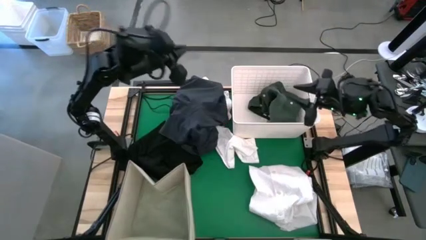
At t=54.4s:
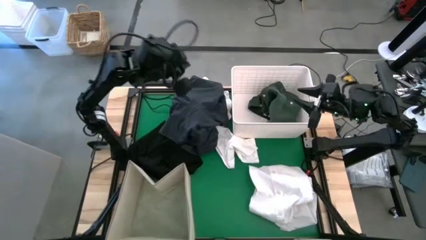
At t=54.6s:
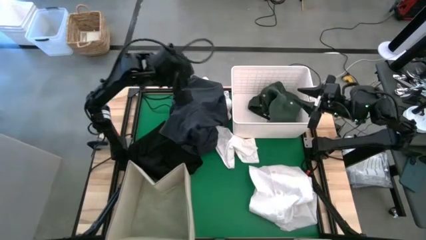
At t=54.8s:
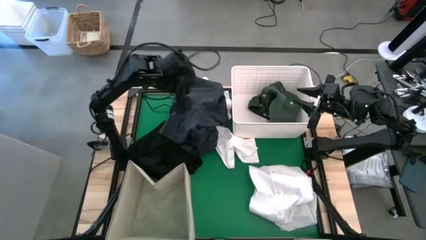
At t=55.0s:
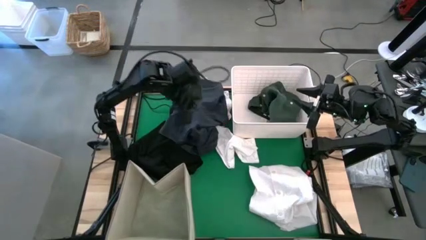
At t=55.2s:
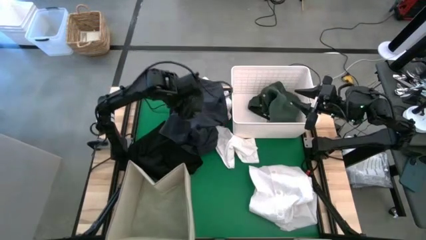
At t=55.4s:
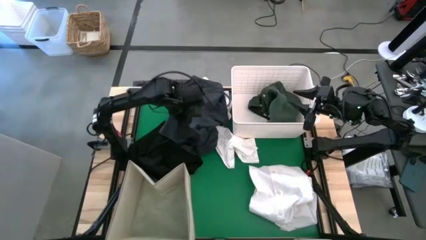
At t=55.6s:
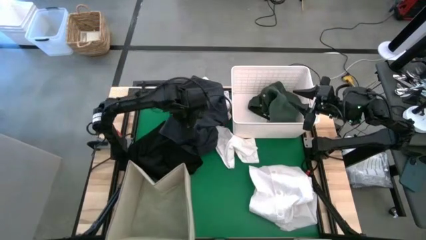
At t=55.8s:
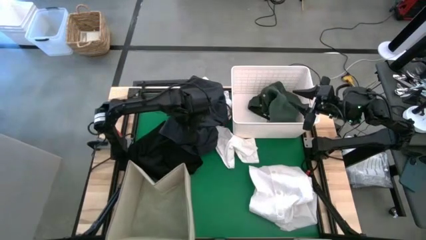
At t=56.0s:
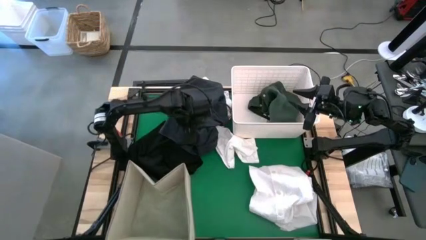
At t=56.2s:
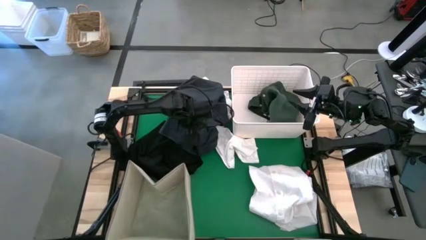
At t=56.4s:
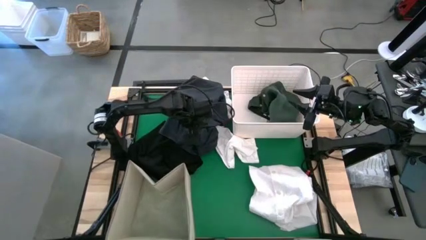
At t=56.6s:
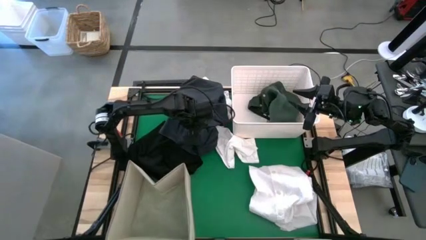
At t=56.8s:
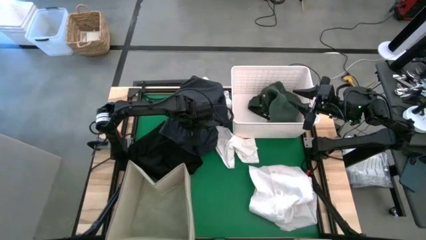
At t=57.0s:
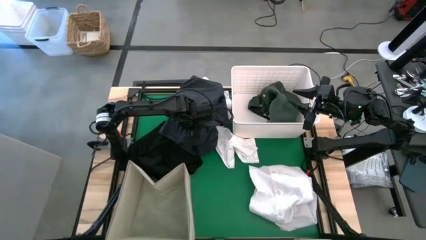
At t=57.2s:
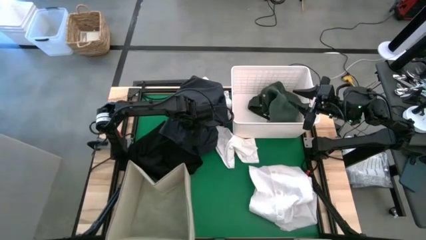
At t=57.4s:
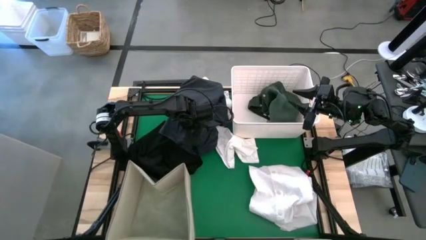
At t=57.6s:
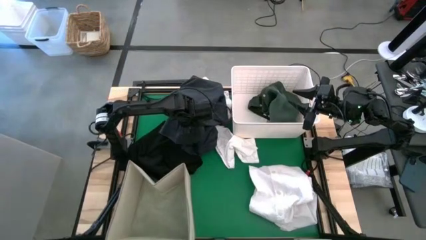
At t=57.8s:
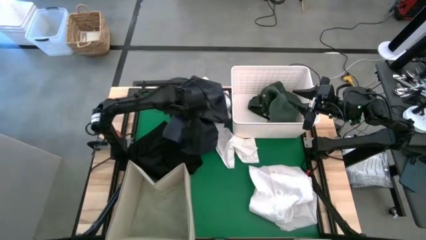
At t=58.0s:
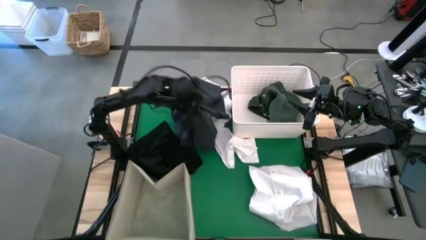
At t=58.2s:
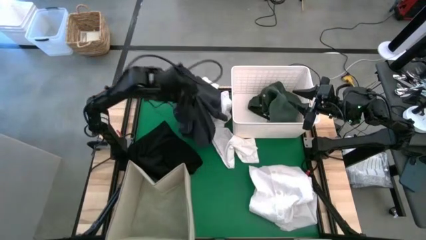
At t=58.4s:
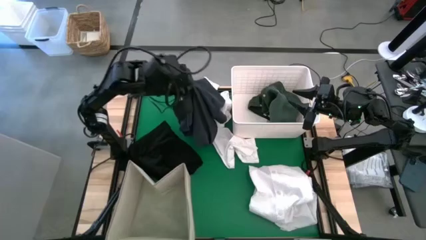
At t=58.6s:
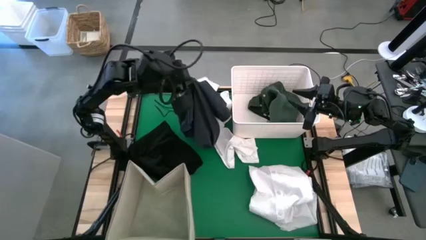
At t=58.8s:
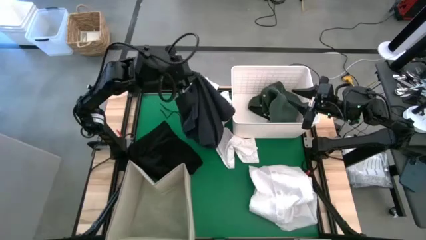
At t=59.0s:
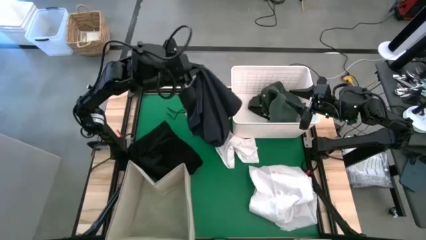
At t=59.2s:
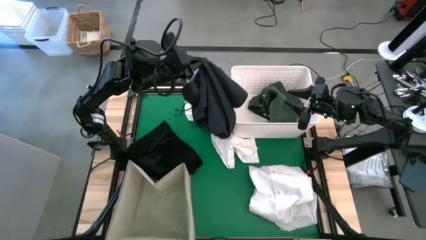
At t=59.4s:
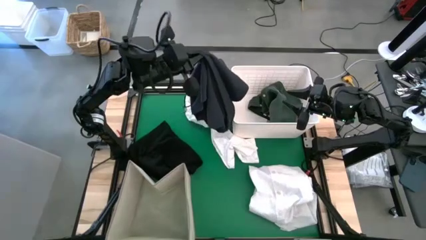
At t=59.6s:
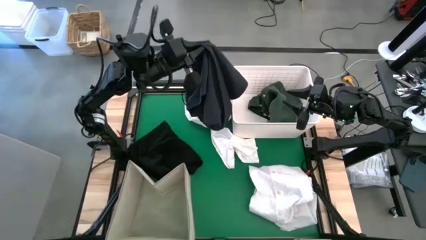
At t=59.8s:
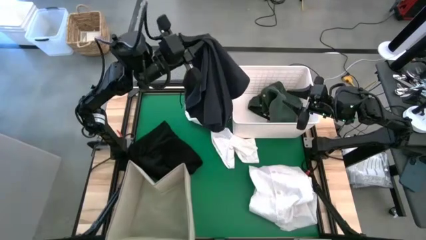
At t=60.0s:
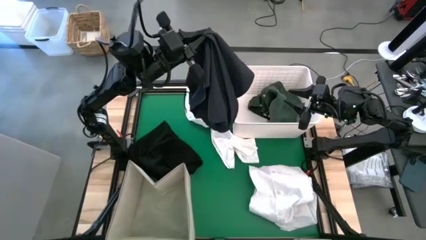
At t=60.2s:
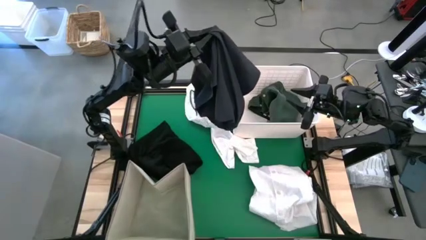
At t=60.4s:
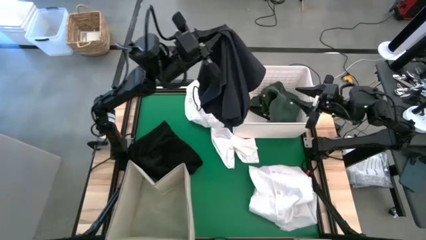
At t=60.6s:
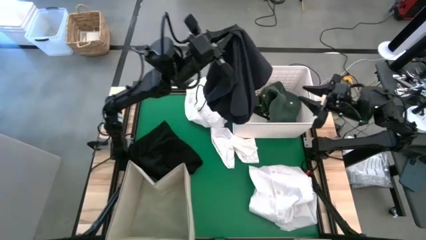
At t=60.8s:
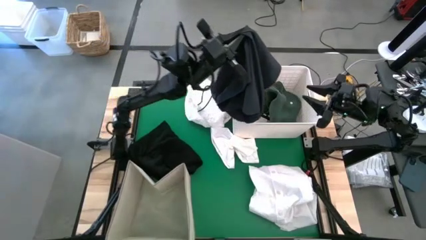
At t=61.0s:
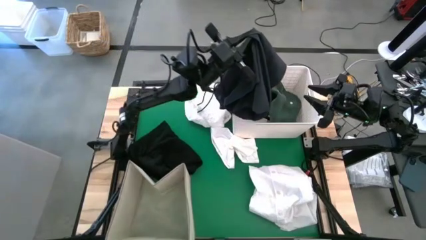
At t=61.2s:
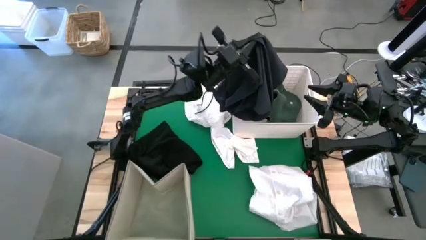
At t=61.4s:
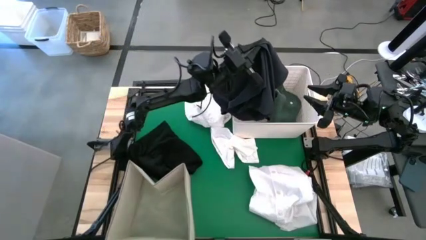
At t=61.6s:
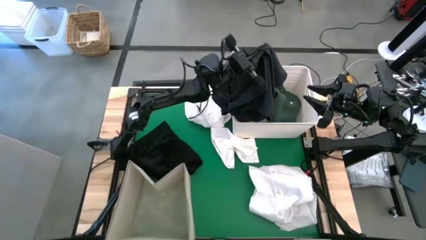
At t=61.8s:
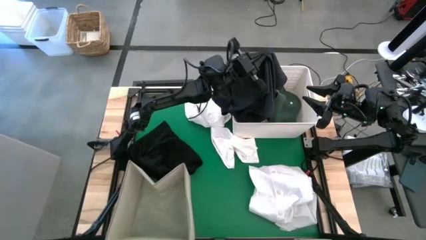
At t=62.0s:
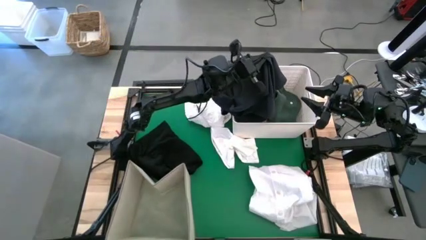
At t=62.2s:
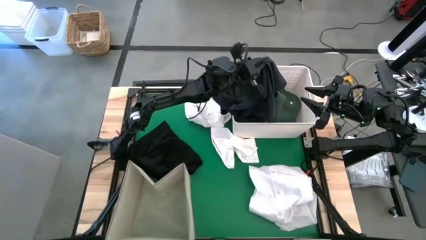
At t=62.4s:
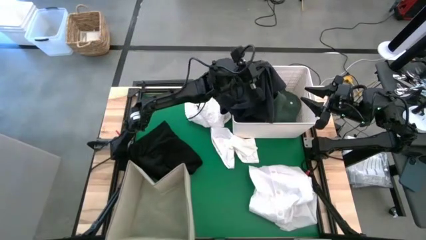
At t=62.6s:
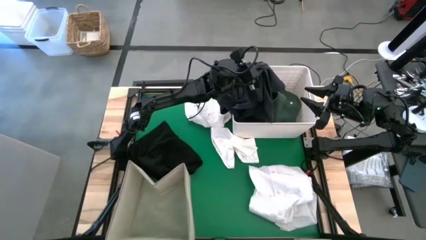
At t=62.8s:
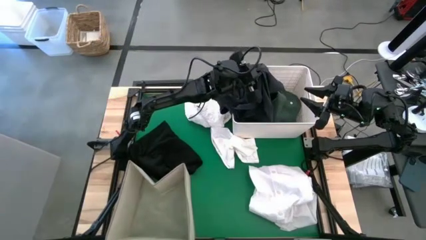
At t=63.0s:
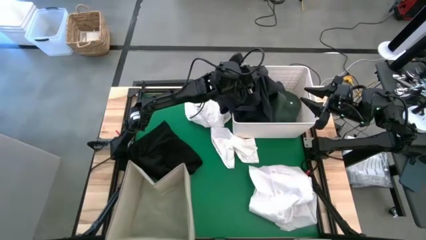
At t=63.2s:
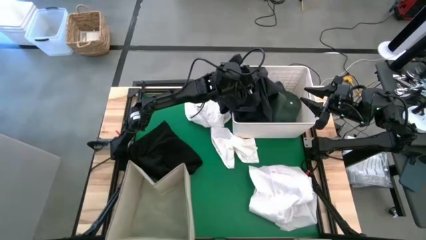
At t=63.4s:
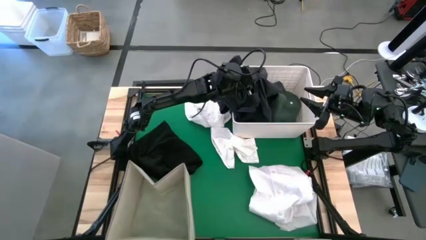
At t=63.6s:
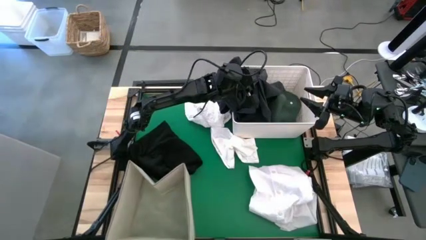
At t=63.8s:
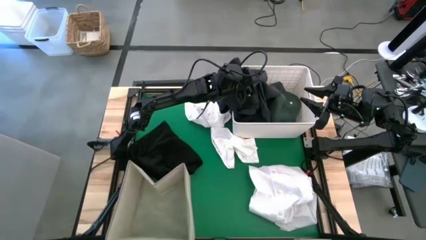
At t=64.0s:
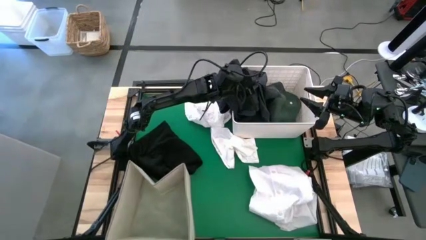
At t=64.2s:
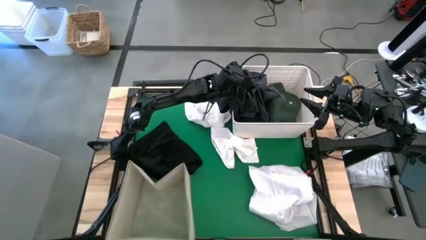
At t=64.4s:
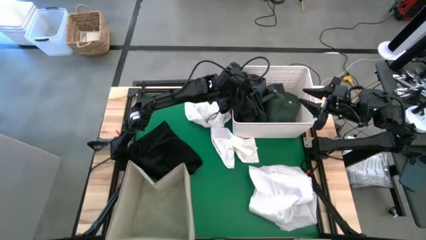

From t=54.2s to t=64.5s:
Task: Sort clothes
Put the black shorts into the top right white bin
